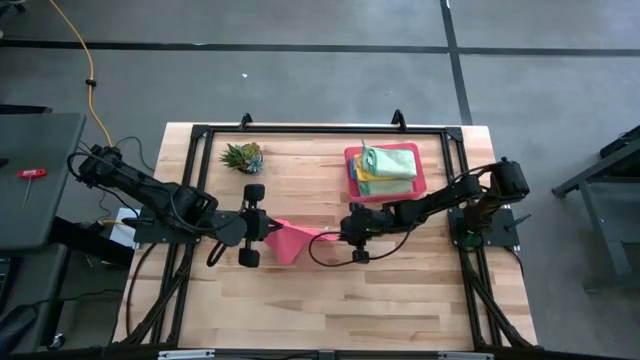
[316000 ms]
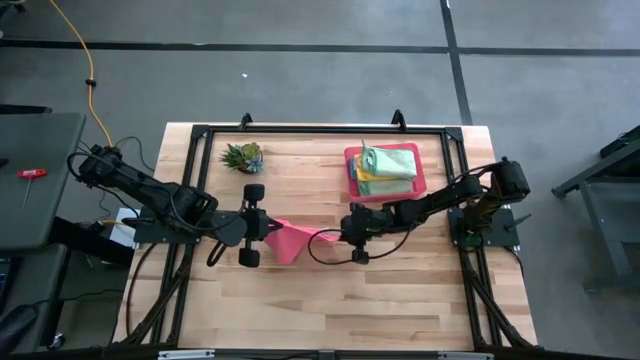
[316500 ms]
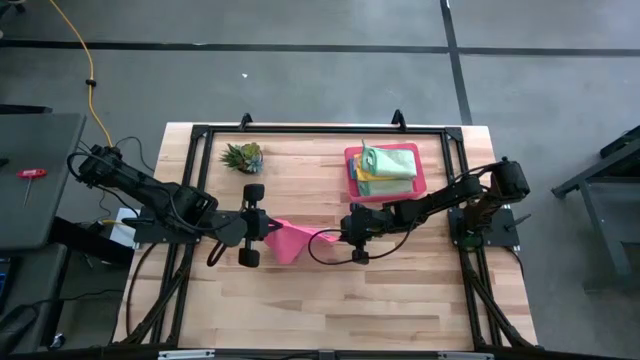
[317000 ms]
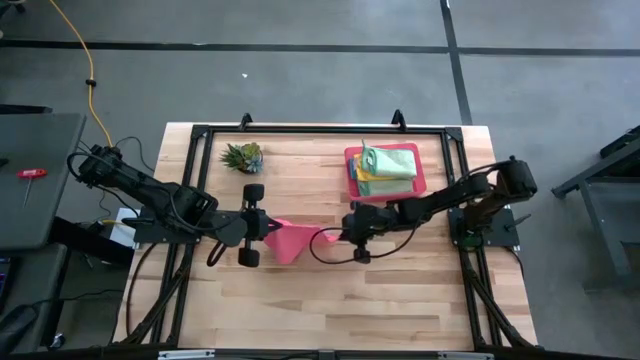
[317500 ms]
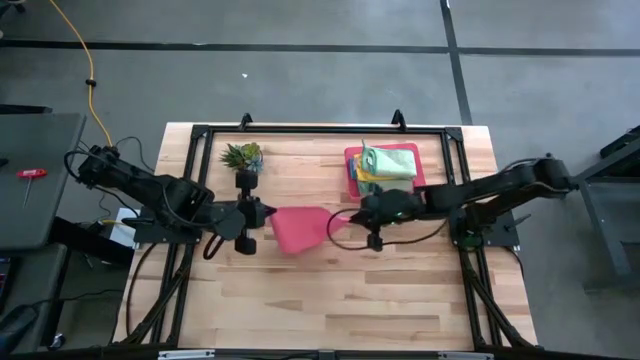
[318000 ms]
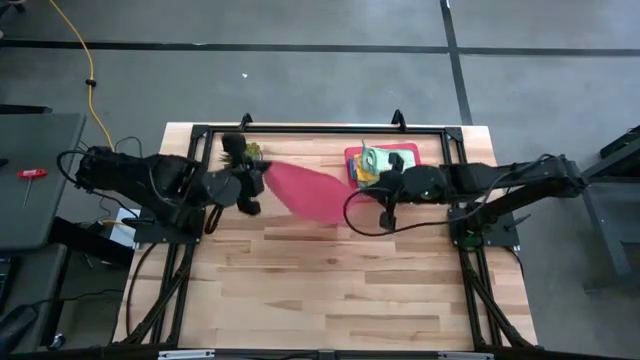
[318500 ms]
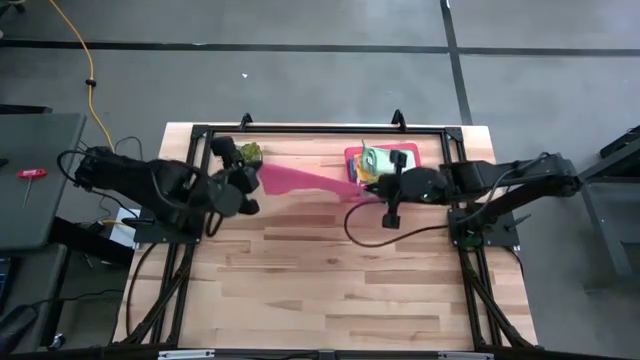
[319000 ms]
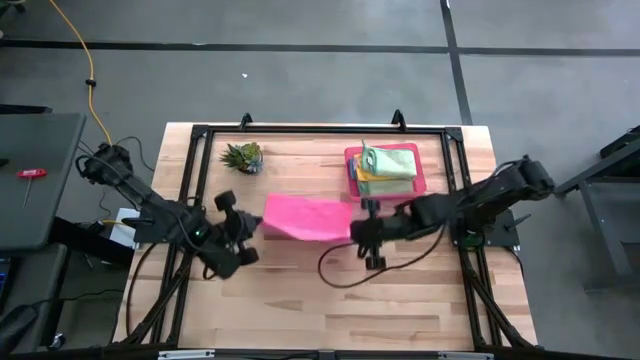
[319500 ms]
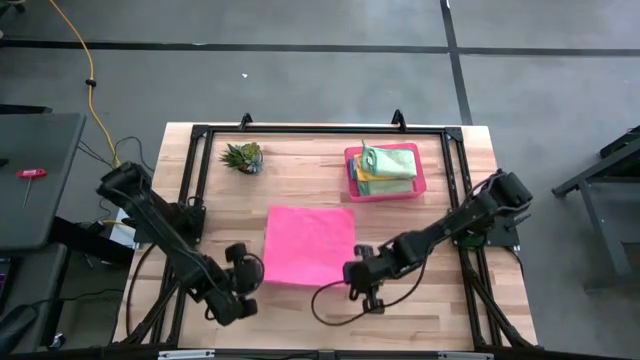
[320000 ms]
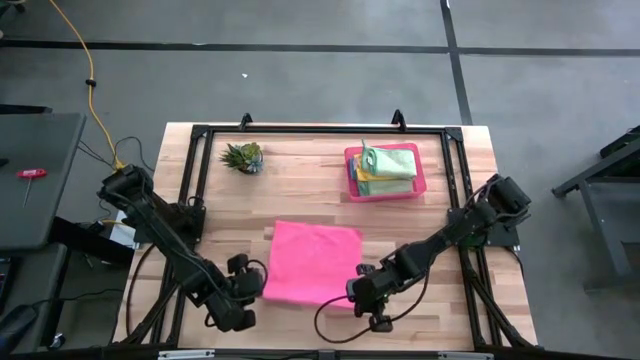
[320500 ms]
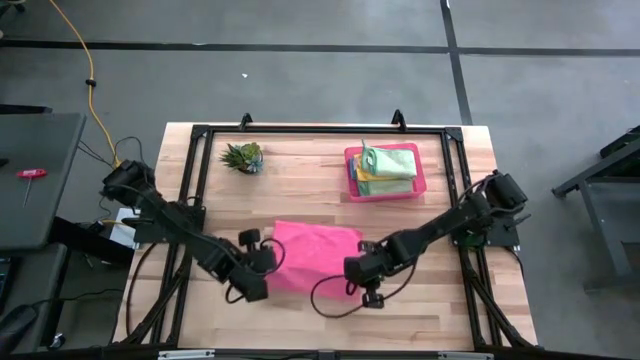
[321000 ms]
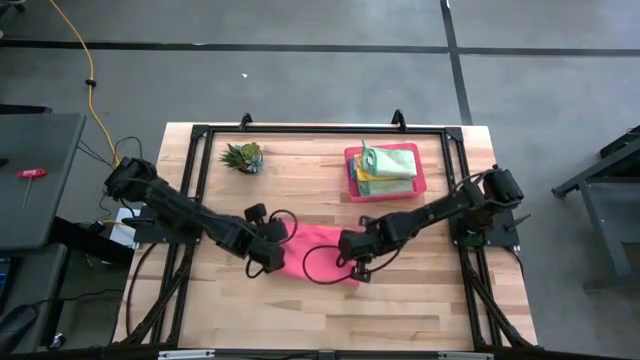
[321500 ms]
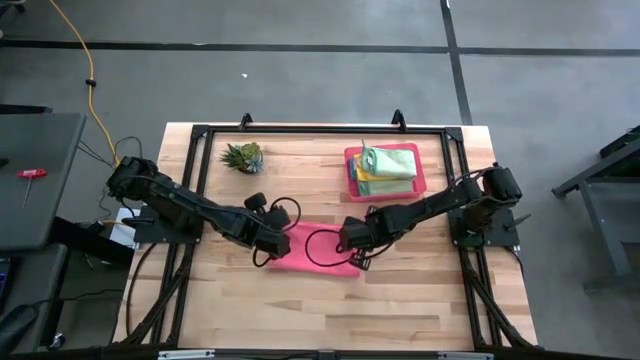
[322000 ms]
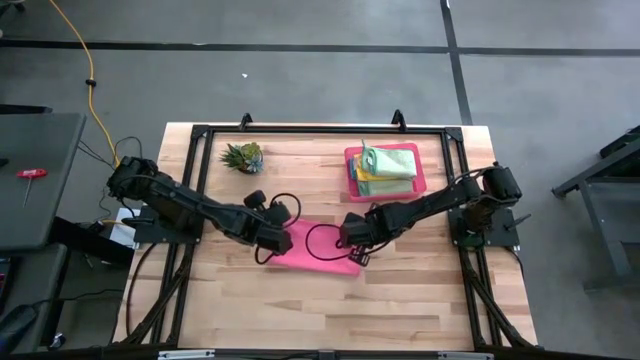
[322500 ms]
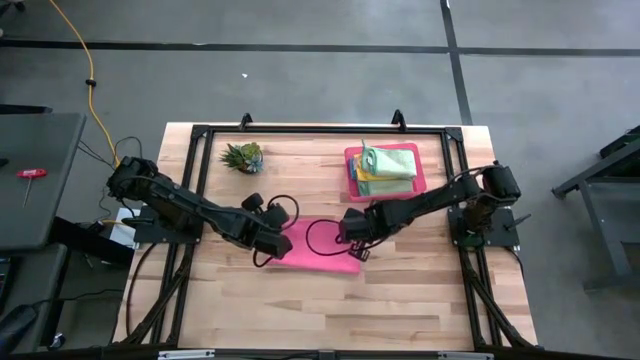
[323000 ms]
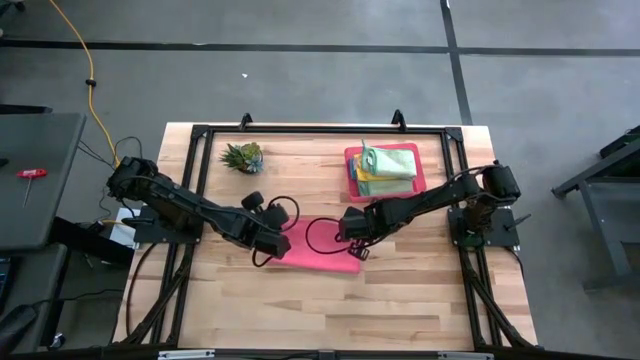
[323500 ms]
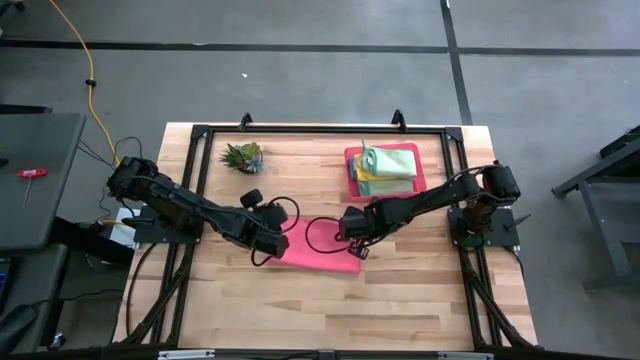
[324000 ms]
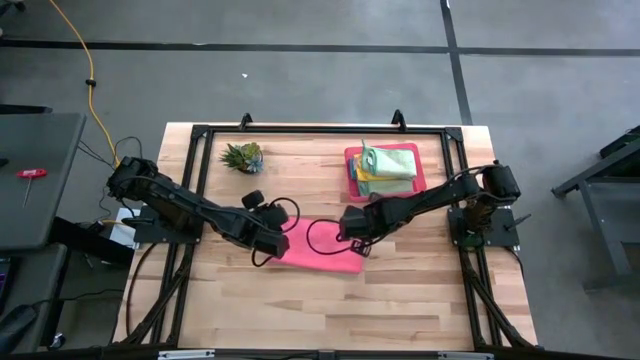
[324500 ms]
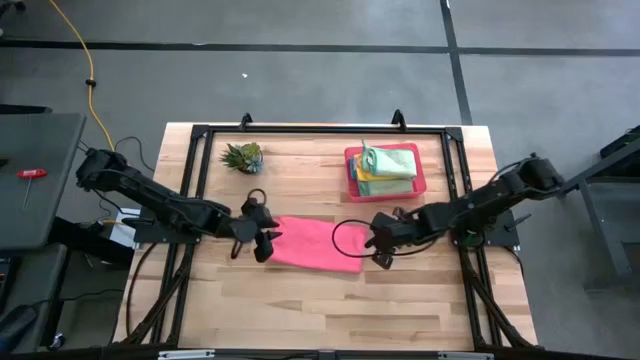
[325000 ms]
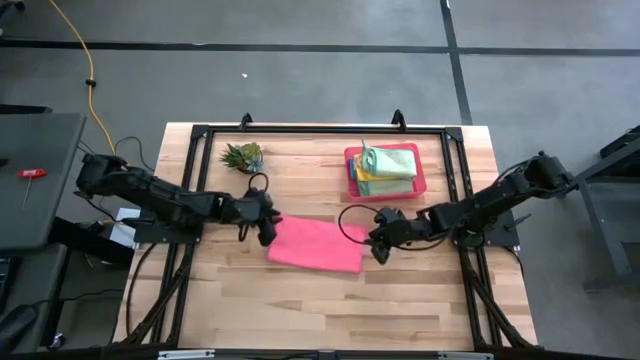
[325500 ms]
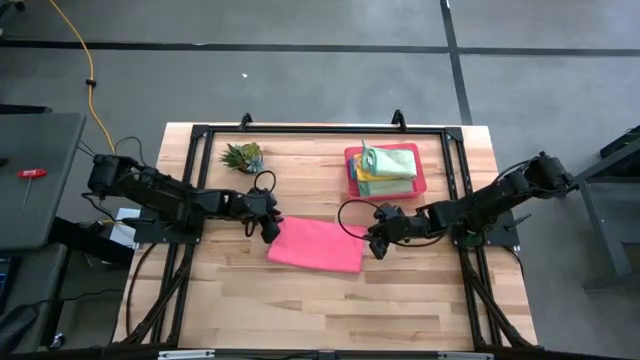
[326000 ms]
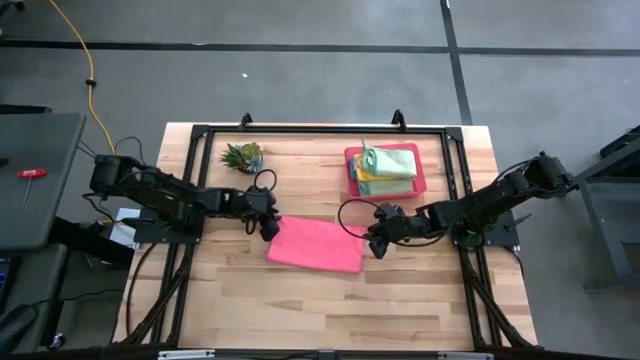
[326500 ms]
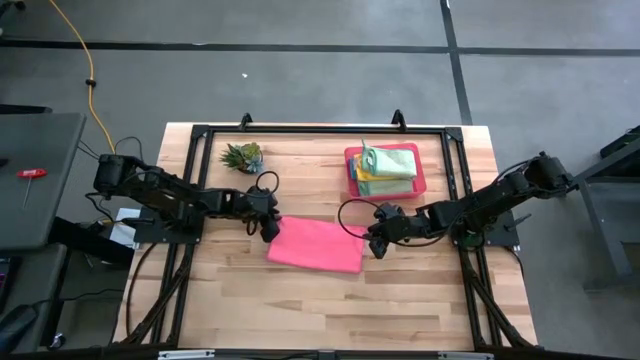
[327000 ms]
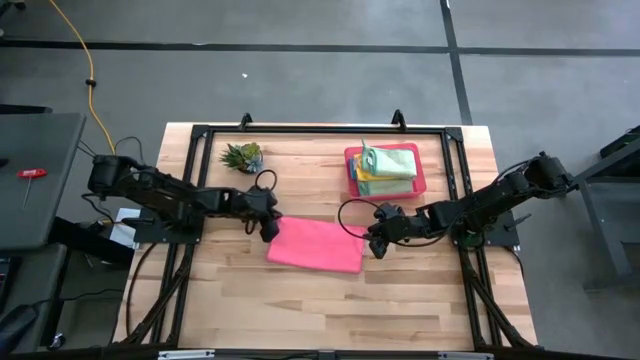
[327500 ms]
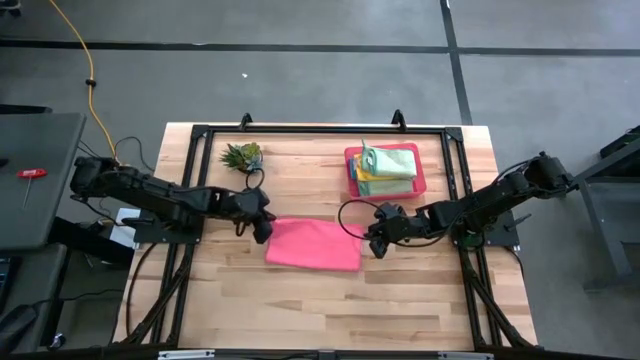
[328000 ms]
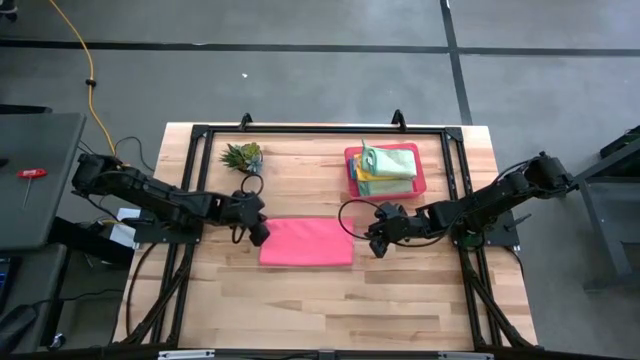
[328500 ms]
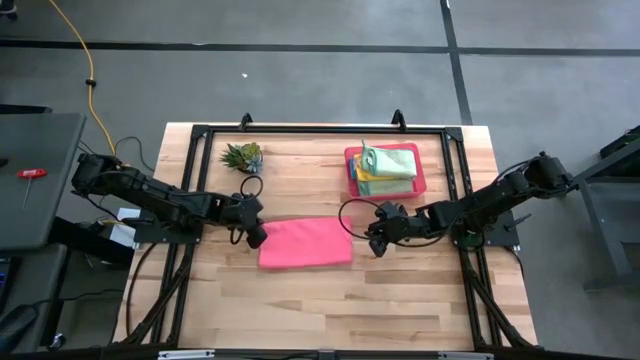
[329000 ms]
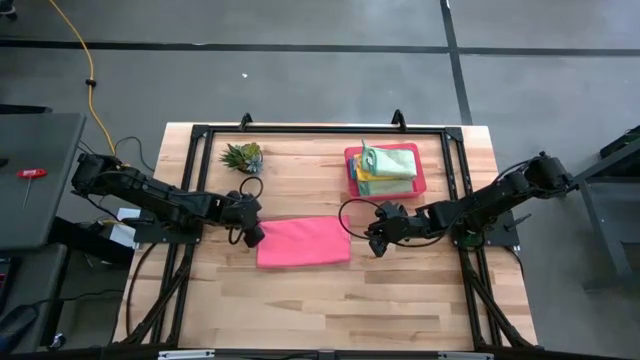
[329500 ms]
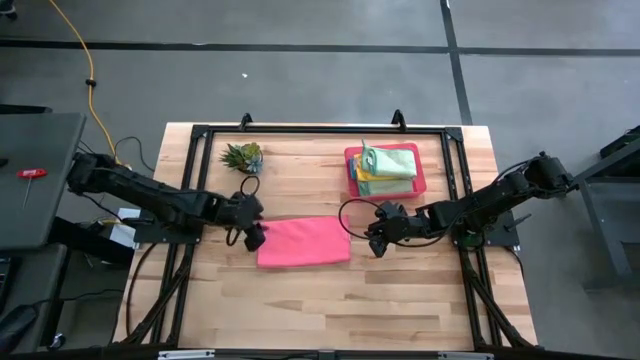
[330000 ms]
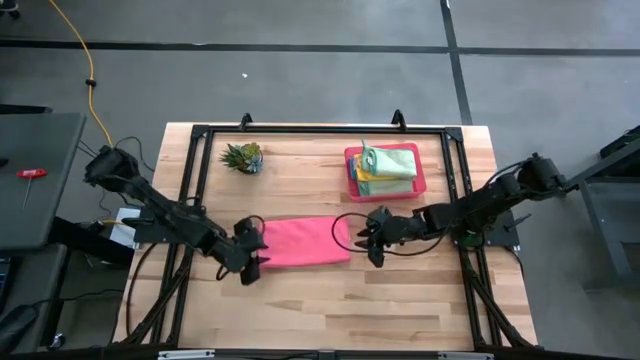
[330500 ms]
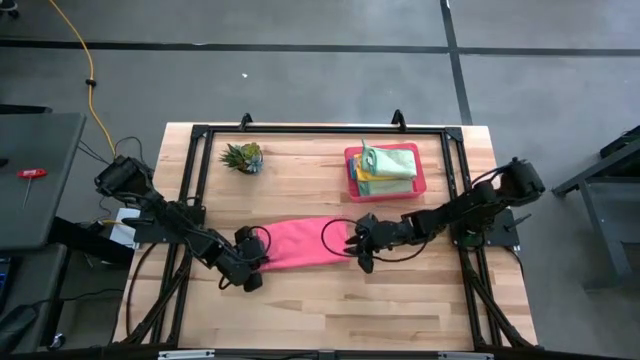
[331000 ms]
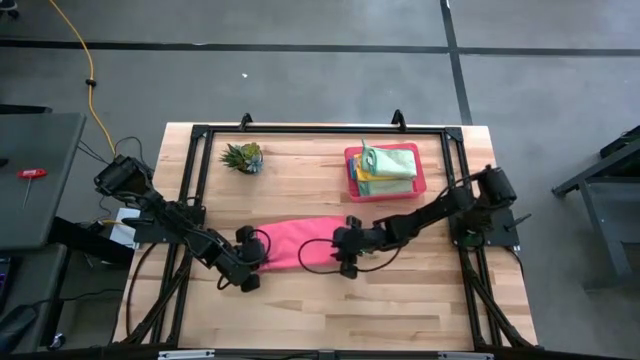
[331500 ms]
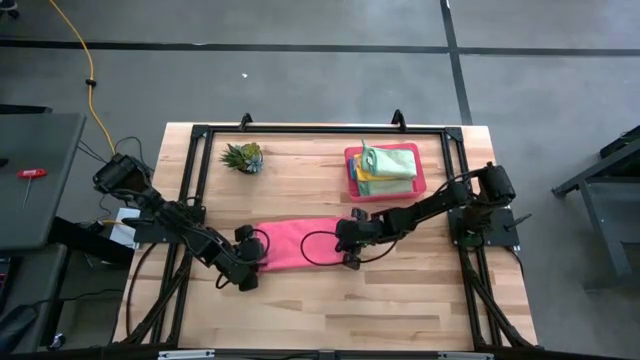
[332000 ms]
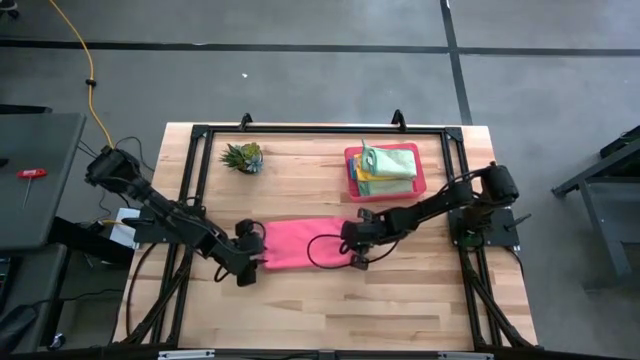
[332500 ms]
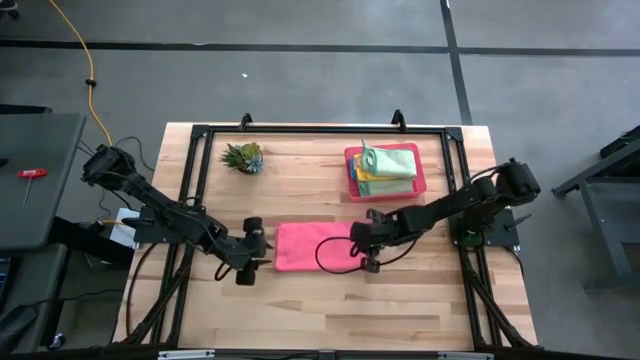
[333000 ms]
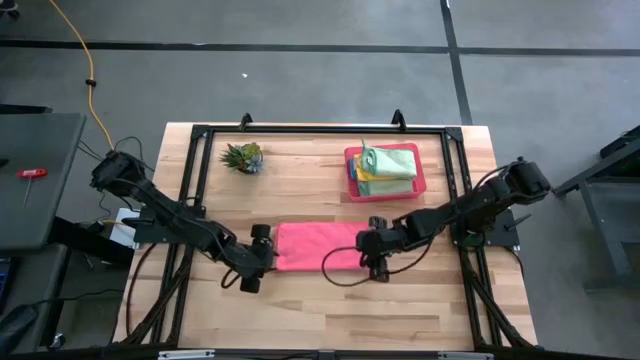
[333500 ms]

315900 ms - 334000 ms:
Task: Fold microfiber towels
Fold the pink microfiber cloth
